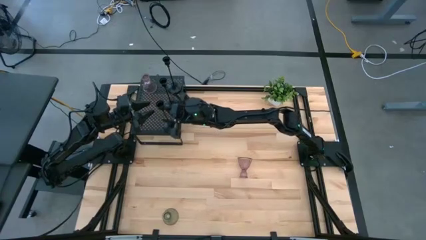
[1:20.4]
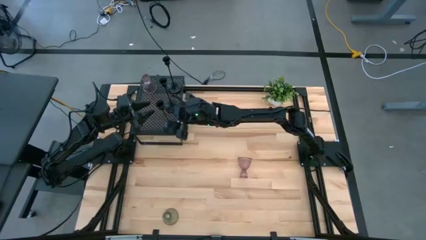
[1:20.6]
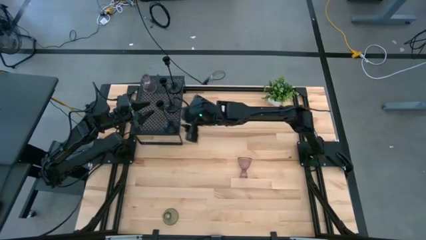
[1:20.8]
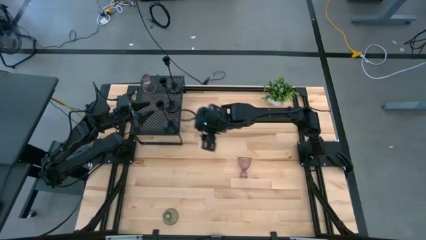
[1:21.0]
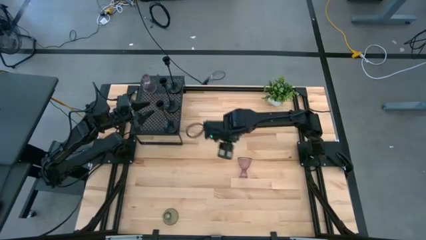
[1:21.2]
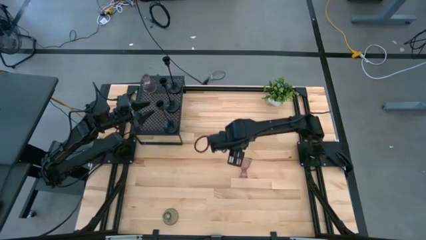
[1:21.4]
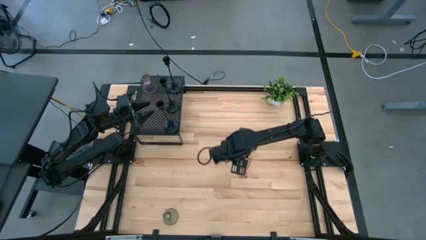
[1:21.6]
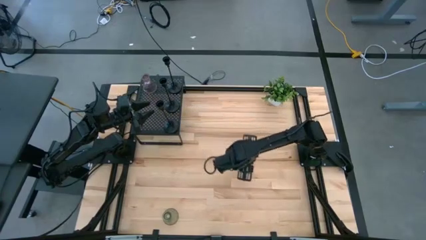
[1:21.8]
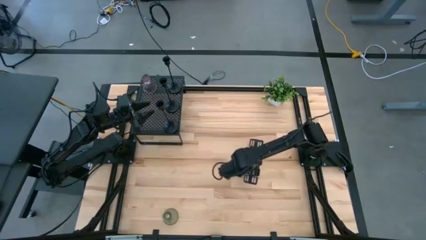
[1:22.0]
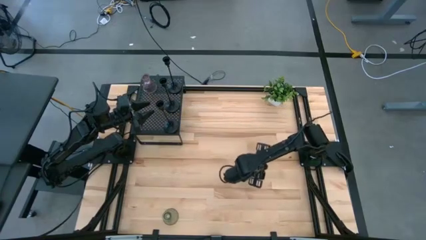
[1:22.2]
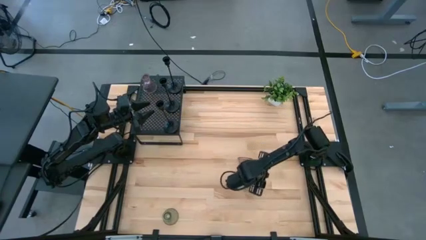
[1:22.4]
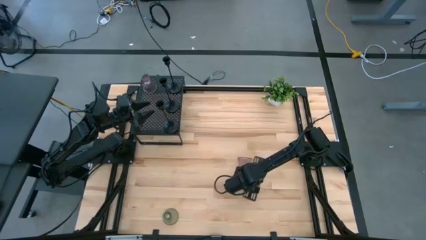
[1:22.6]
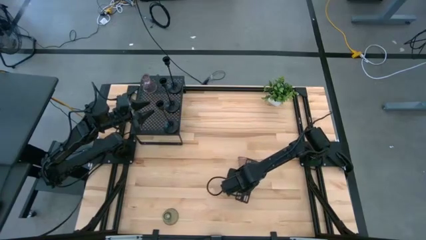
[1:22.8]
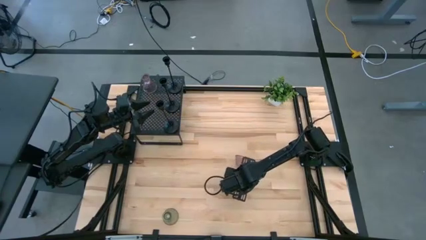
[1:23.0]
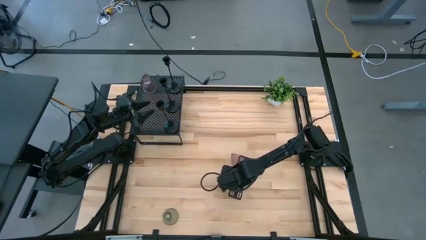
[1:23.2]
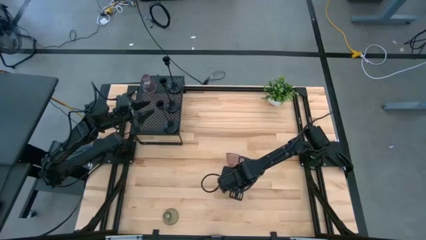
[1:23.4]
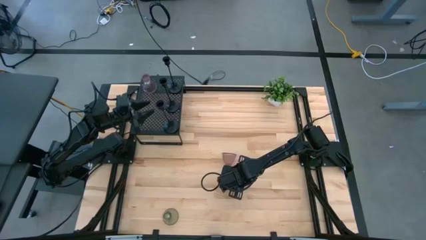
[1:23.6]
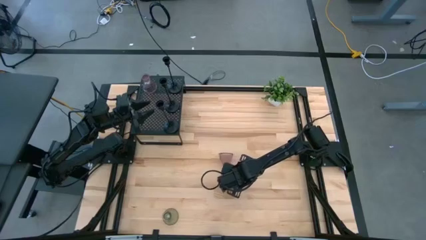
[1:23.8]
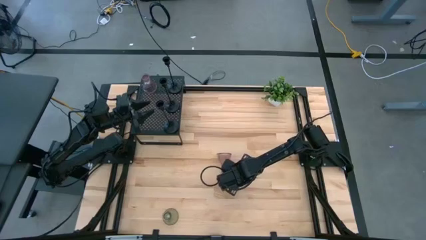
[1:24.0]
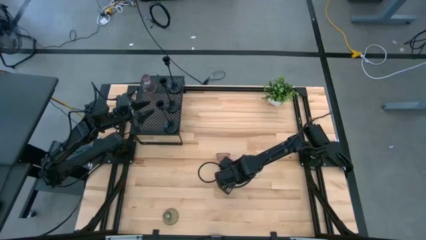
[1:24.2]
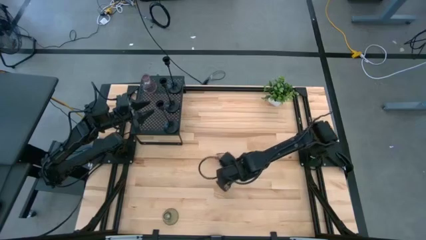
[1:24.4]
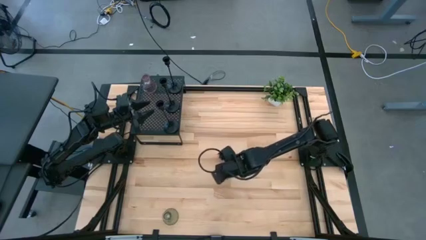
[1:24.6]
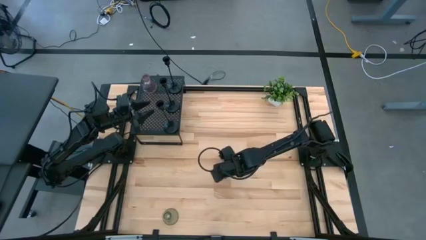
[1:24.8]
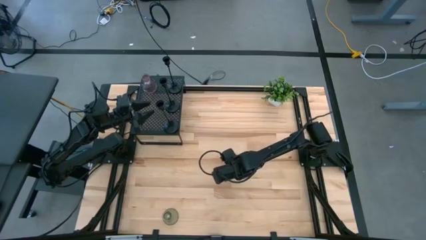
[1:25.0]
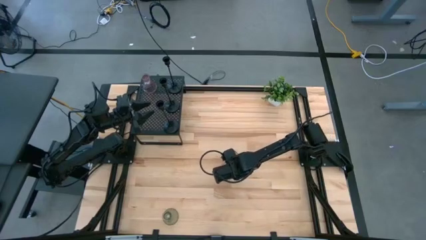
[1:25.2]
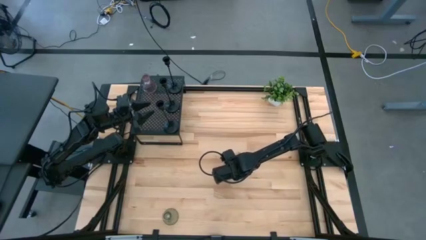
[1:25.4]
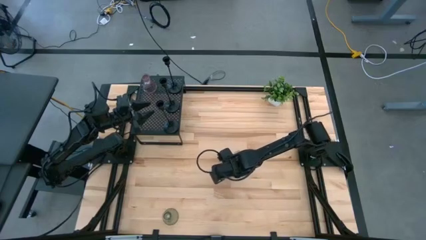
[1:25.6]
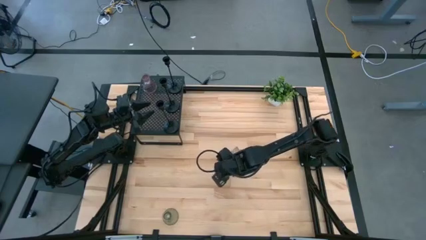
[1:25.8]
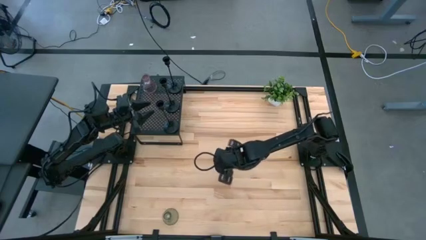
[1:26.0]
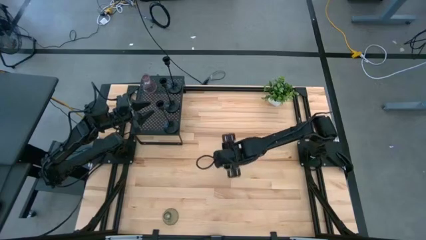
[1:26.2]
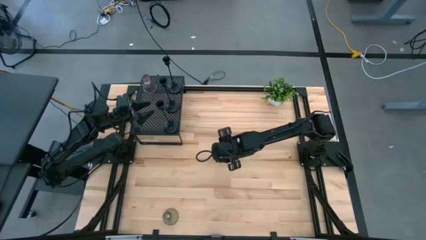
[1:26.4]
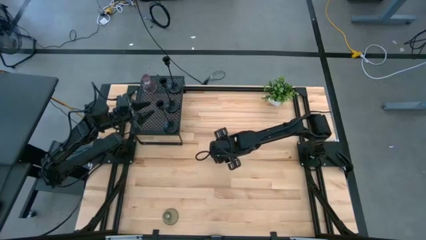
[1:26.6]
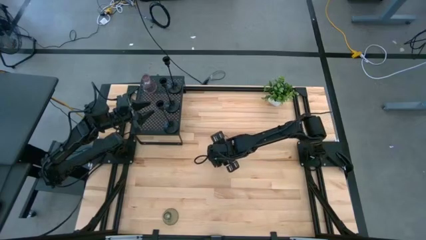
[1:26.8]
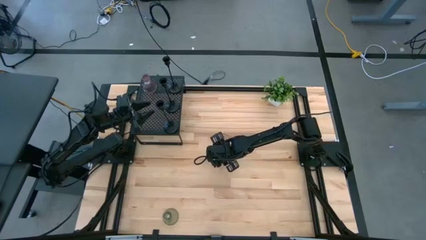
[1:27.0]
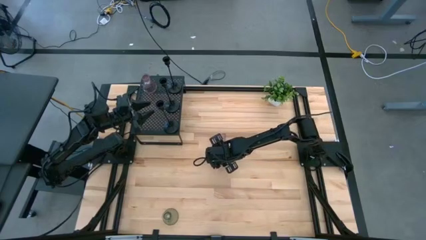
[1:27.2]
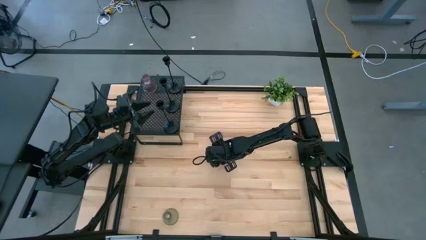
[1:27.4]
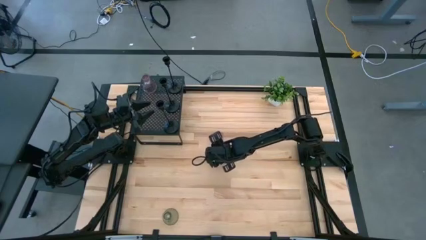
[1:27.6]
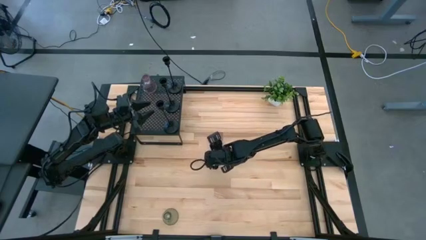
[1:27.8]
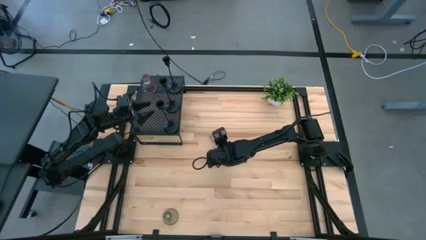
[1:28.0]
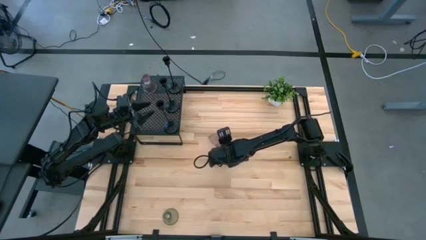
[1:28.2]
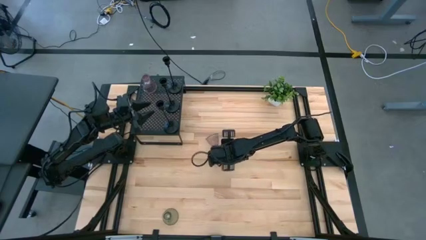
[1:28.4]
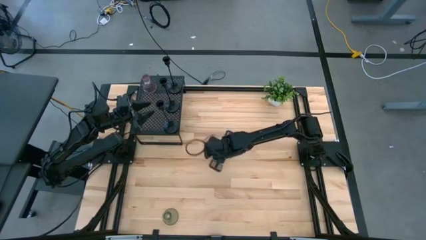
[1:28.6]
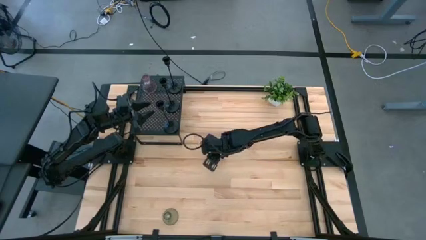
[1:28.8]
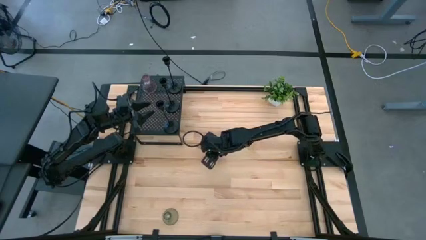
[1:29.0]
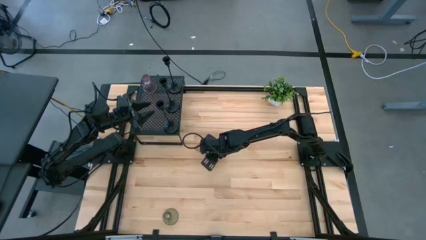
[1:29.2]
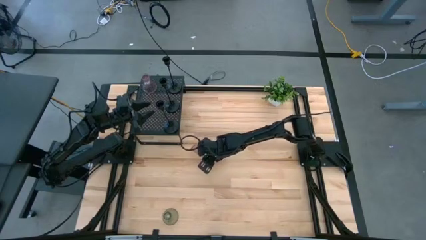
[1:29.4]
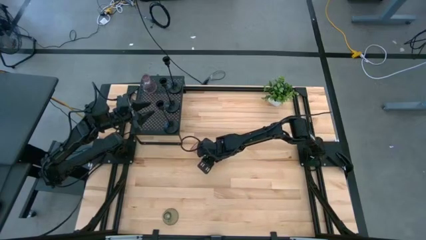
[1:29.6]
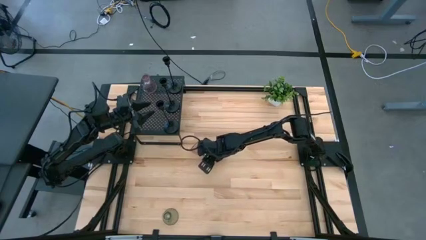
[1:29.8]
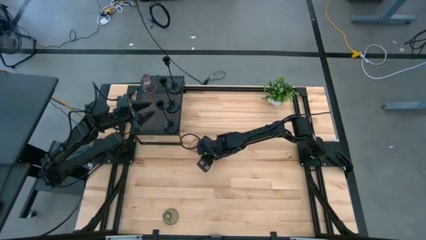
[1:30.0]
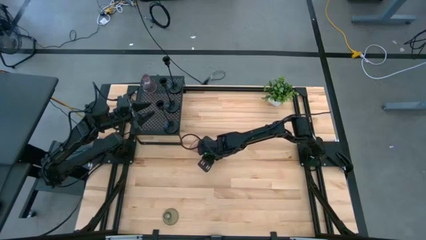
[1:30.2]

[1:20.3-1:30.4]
Task: Pick & Place candle stick holders
Align the pink candle holder with the other pink candle holder on the shelf

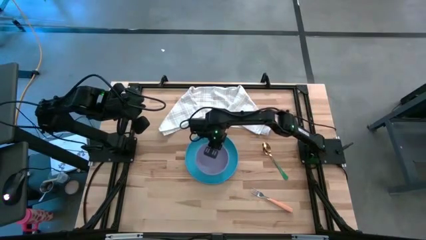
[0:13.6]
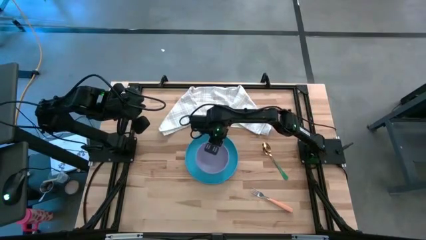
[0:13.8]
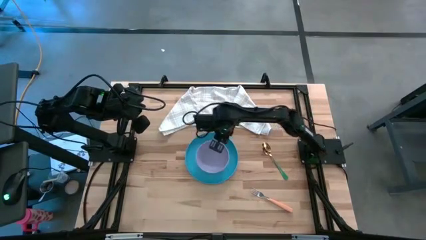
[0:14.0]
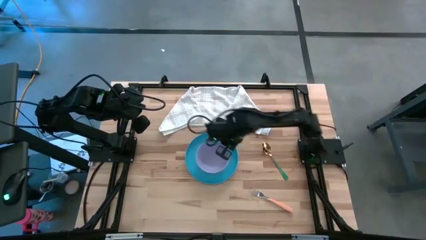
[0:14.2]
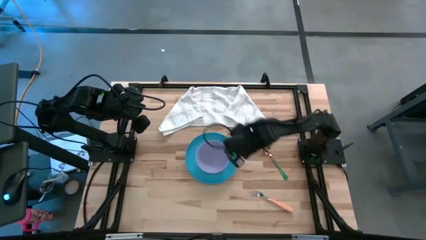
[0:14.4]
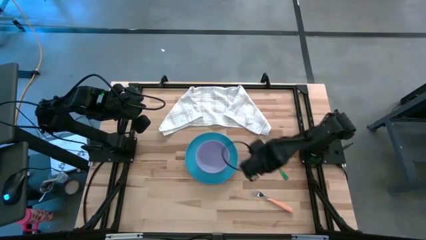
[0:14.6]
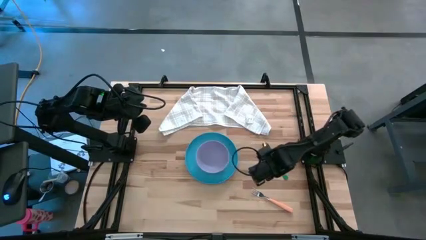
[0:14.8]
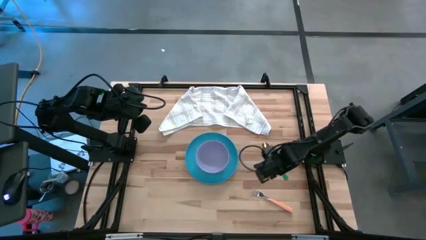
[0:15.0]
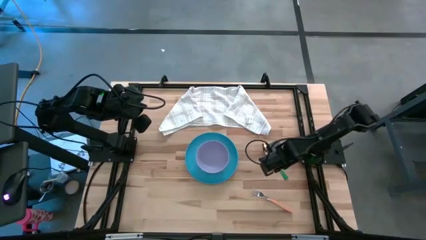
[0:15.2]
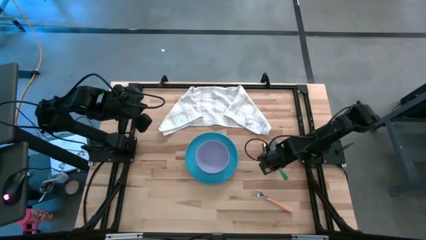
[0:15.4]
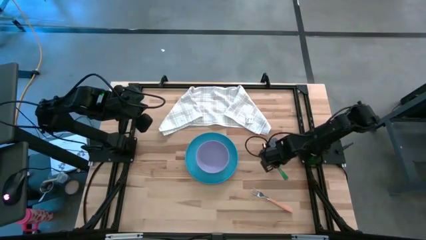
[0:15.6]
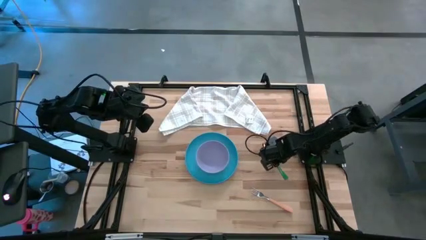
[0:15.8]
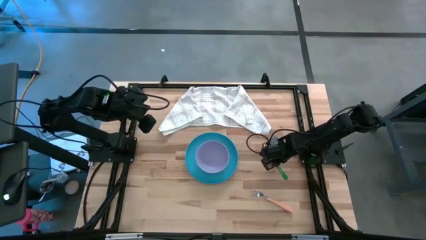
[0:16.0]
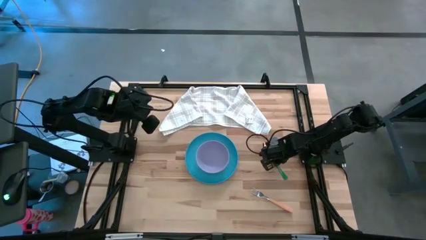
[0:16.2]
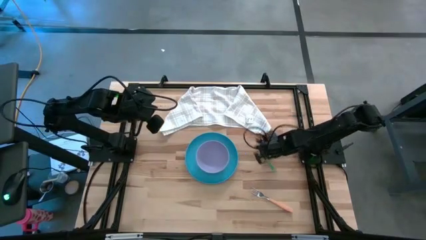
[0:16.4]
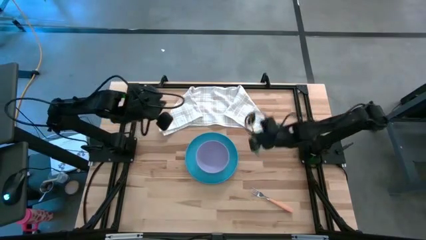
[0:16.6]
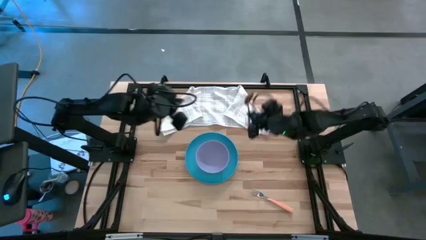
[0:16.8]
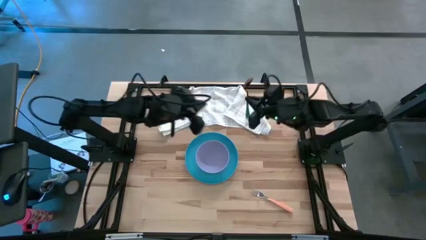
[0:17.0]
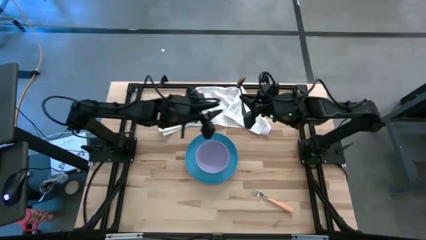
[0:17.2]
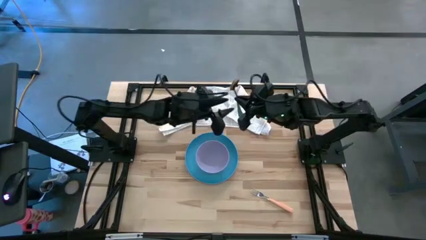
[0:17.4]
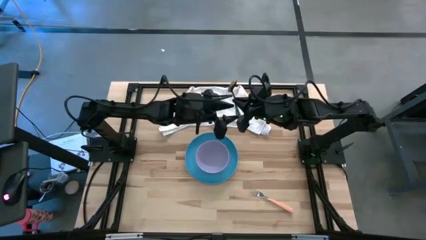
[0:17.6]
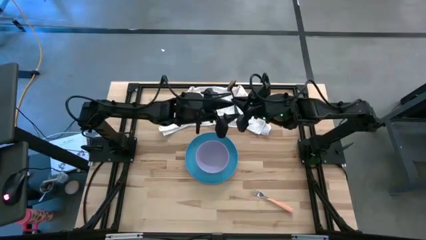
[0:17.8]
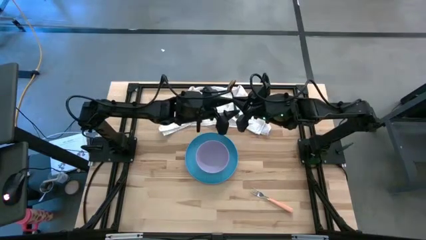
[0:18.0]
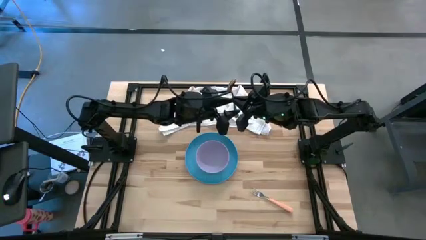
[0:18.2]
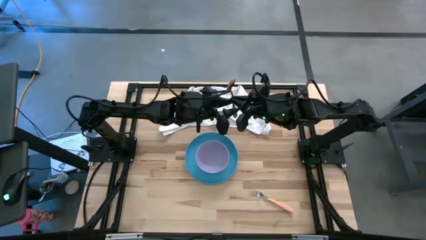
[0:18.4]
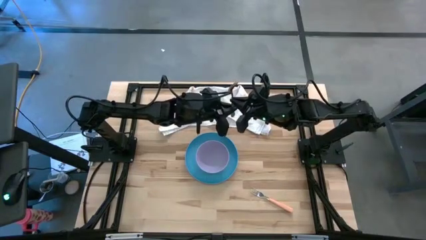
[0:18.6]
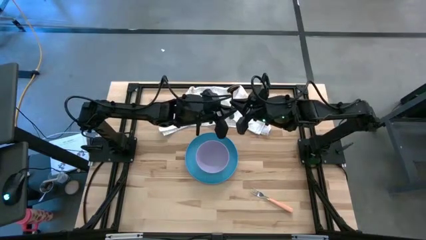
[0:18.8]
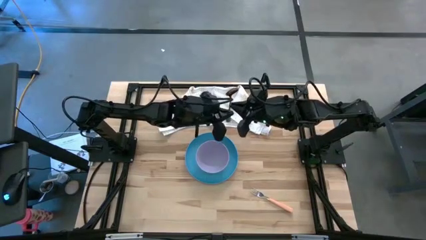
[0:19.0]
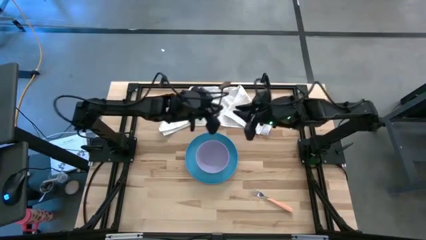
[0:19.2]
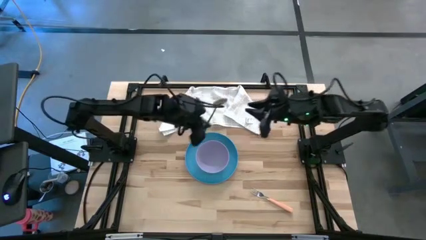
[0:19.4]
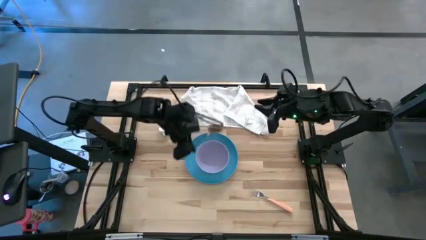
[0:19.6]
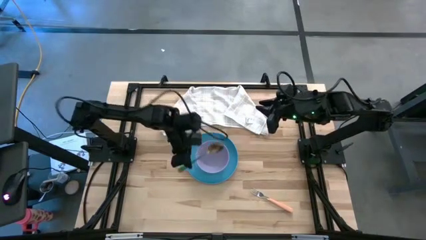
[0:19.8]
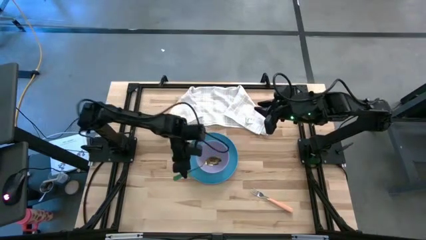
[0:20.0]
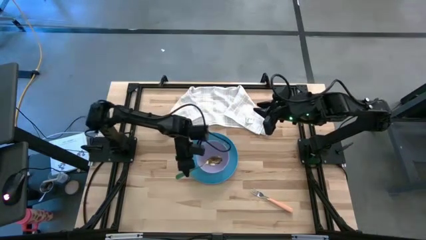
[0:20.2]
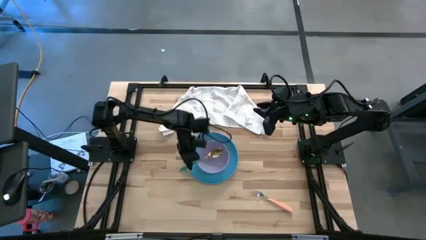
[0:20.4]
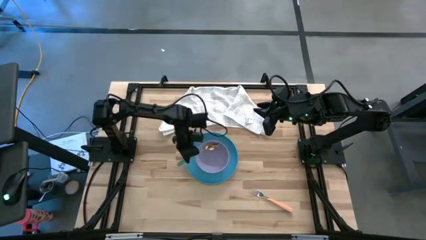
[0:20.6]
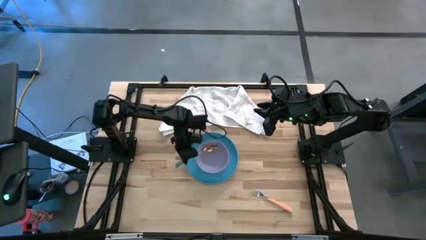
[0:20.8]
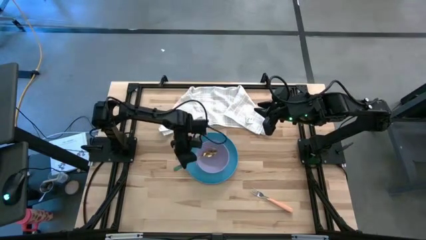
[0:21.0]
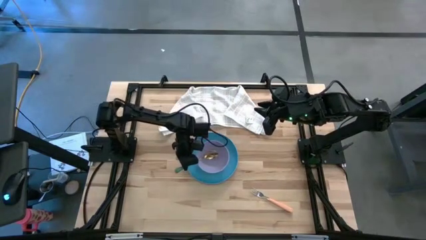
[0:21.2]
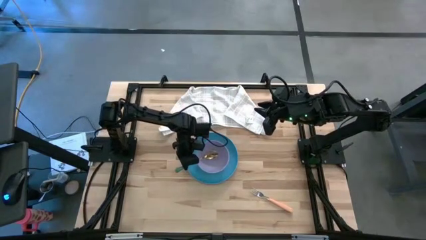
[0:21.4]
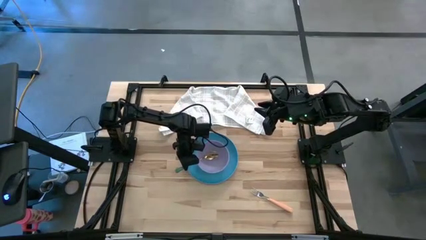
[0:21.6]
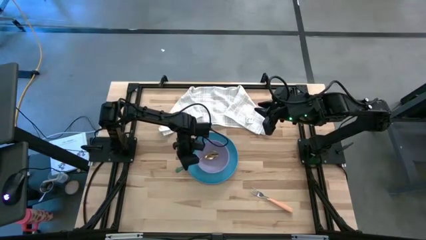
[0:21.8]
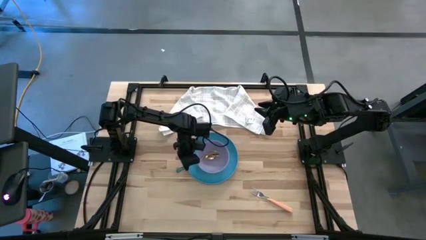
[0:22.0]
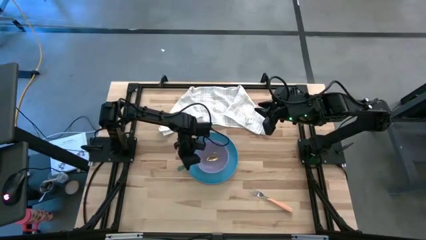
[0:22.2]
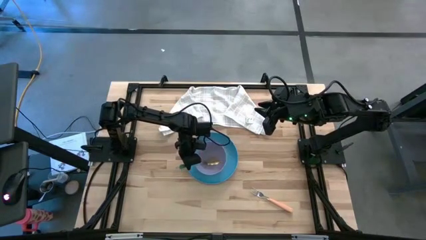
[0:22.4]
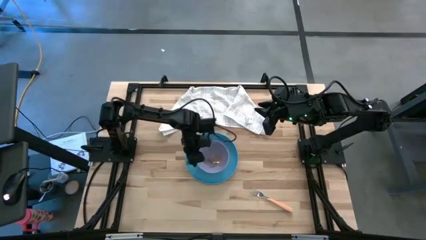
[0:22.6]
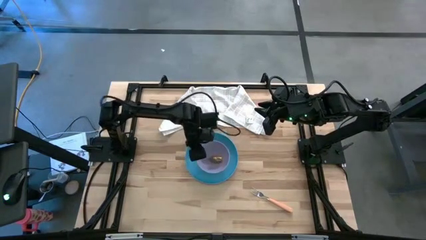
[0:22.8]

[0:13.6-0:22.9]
Task: Set table place
Put the green spoon into the purple bowl
